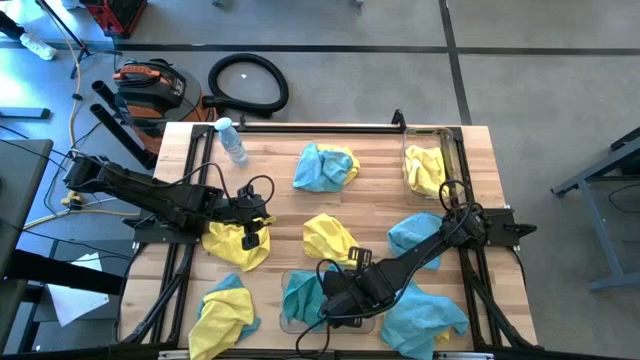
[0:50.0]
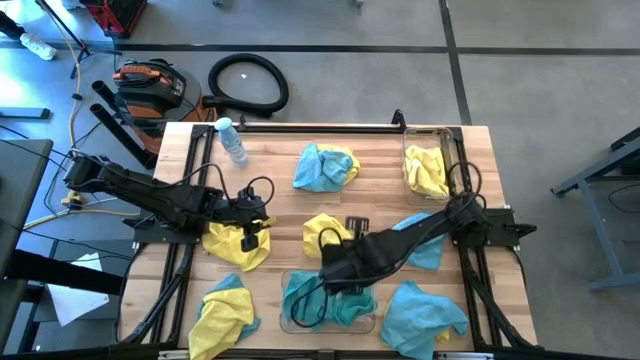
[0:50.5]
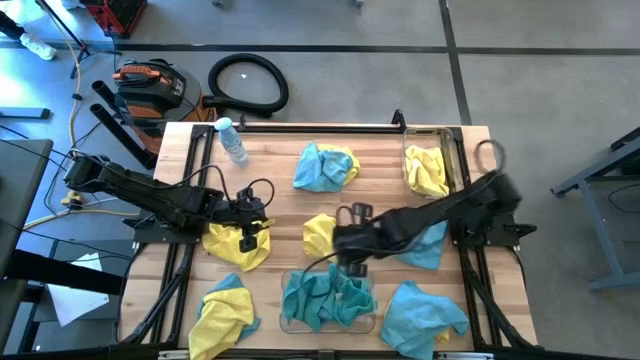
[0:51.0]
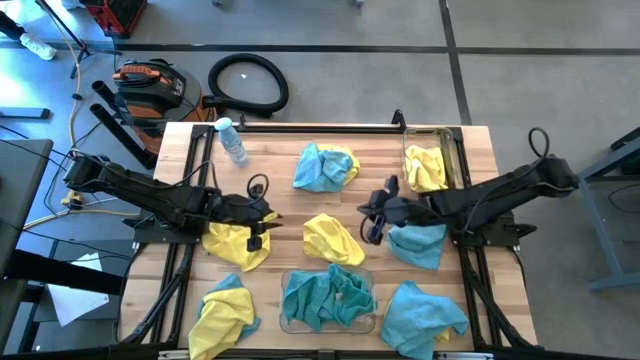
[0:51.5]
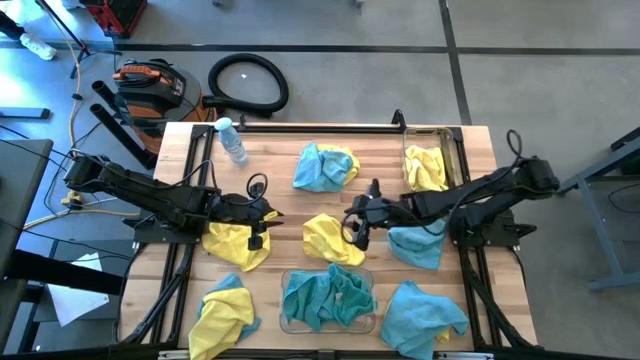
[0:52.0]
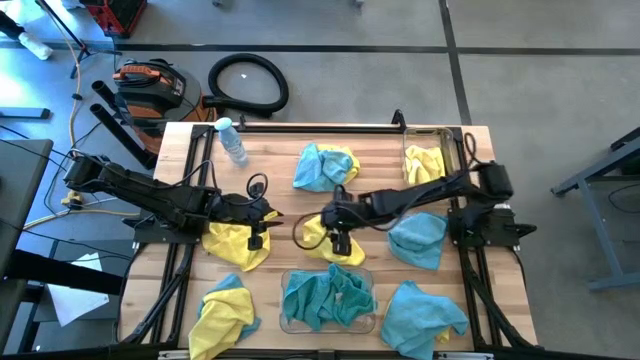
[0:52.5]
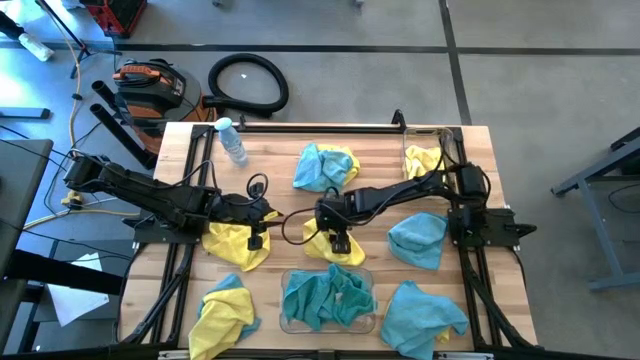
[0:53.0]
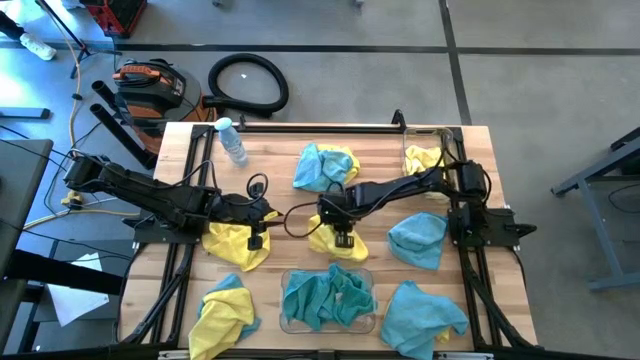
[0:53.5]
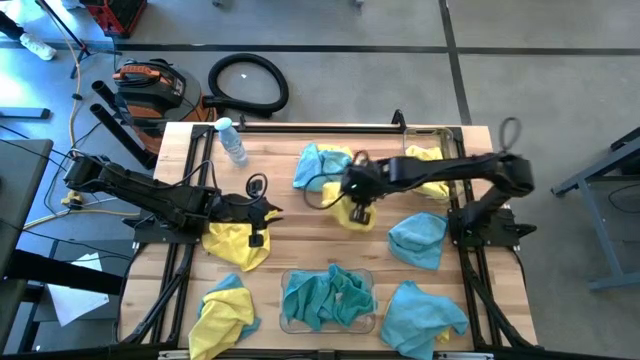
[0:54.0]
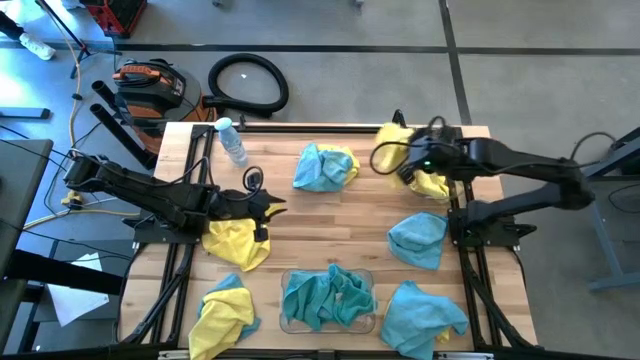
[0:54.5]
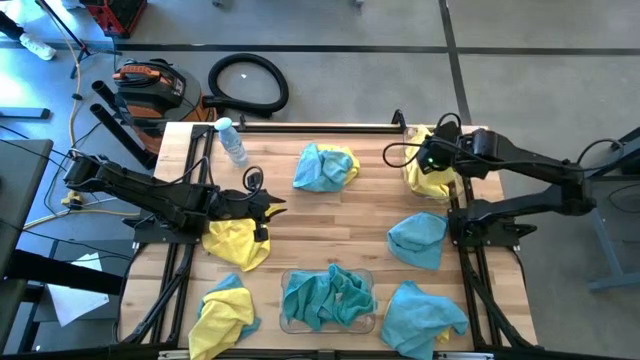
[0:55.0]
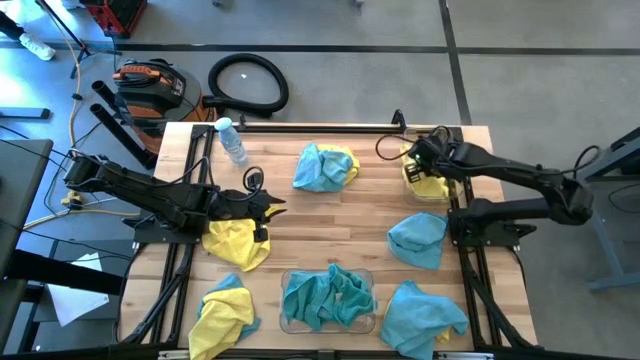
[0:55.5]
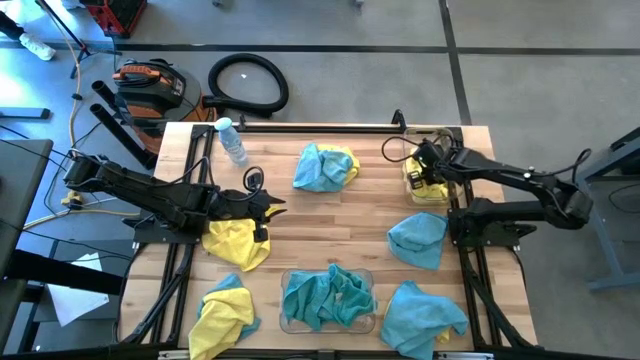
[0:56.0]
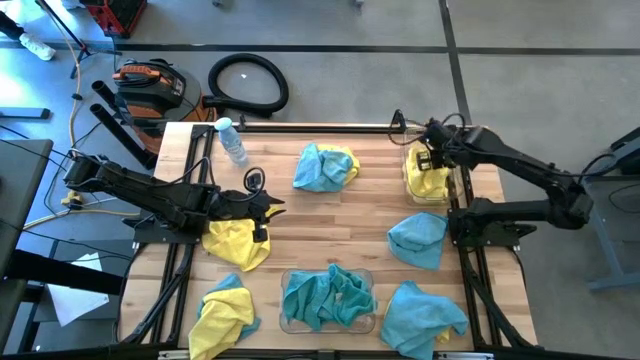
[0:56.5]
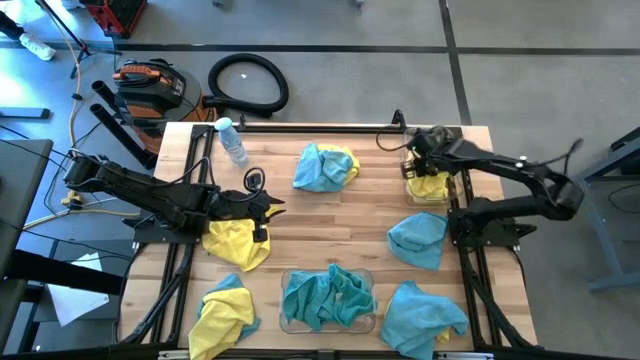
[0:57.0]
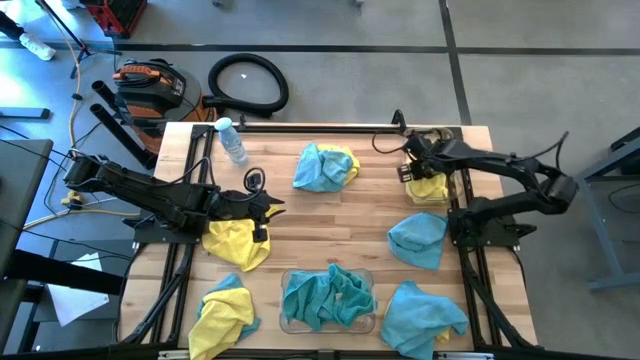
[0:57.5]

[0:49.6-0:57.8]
Task: Sort microfiber towel by color & place in baskets
Put the yellow microfiber towel into the top transparent bin

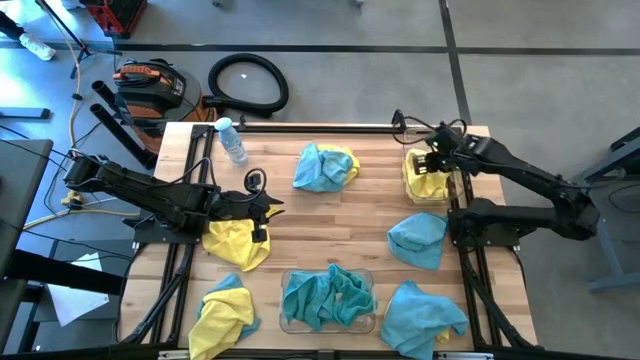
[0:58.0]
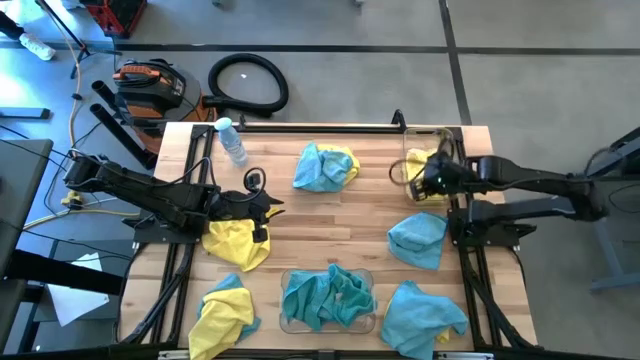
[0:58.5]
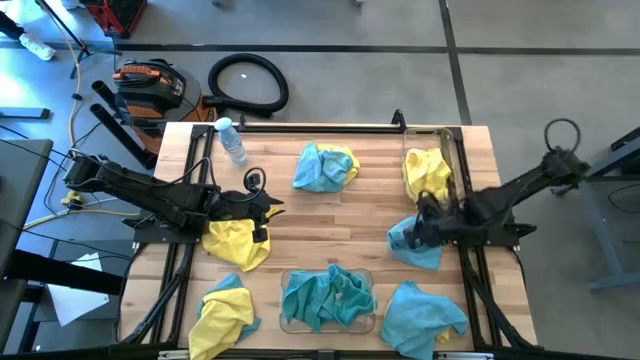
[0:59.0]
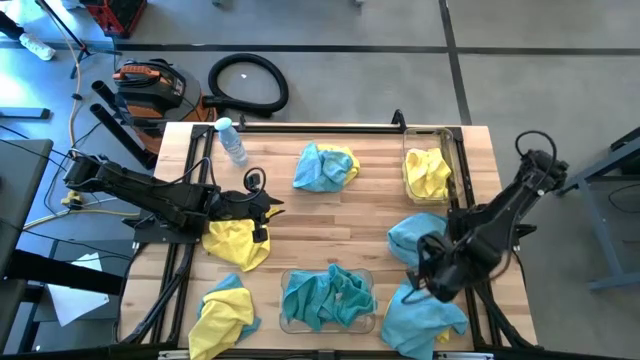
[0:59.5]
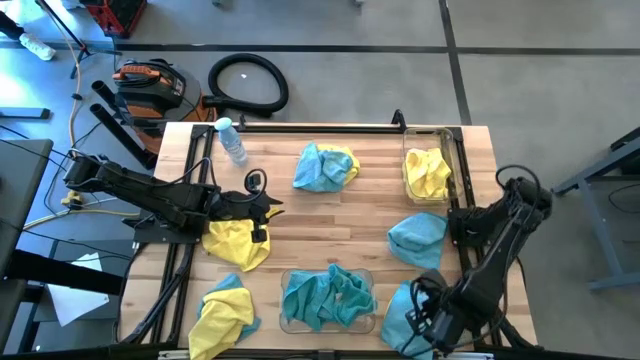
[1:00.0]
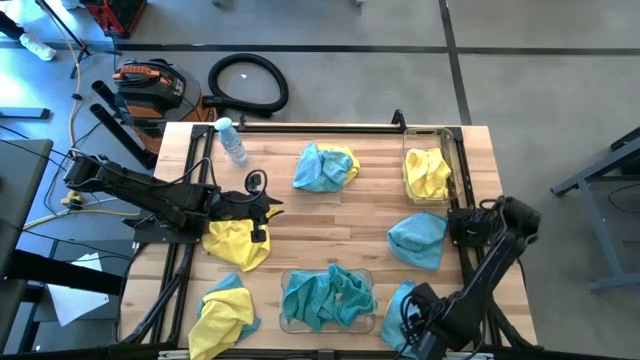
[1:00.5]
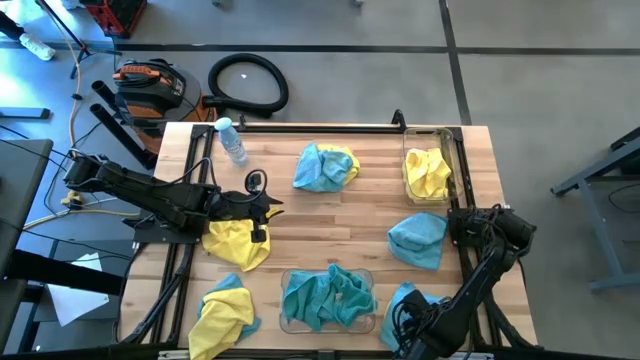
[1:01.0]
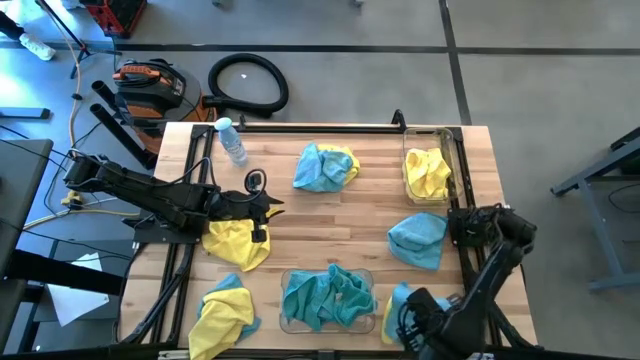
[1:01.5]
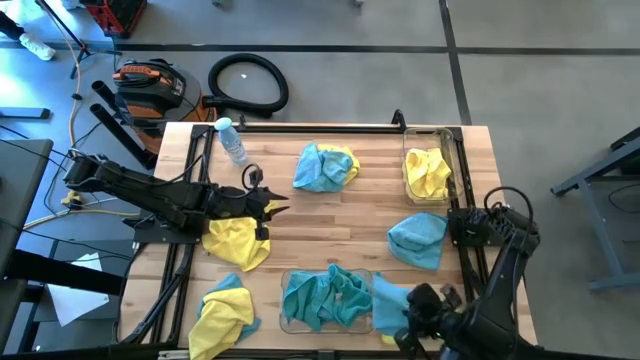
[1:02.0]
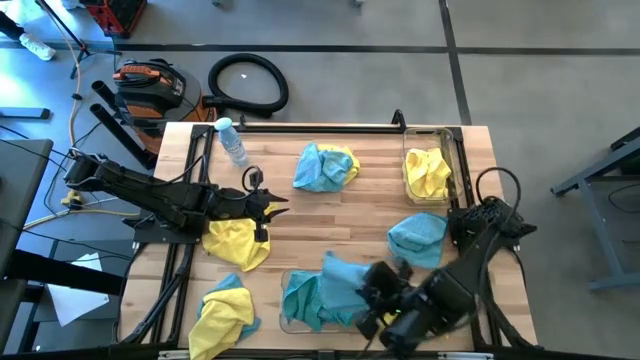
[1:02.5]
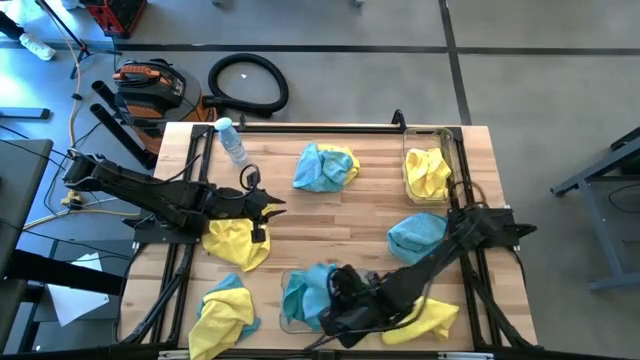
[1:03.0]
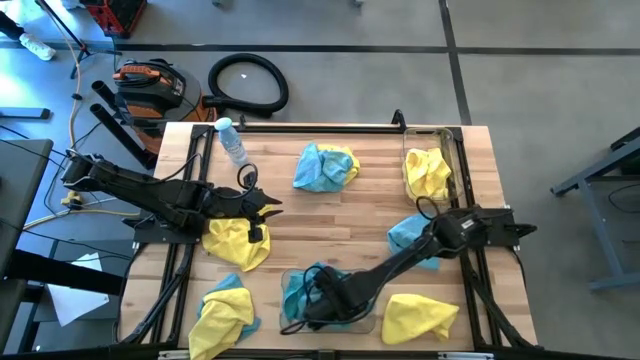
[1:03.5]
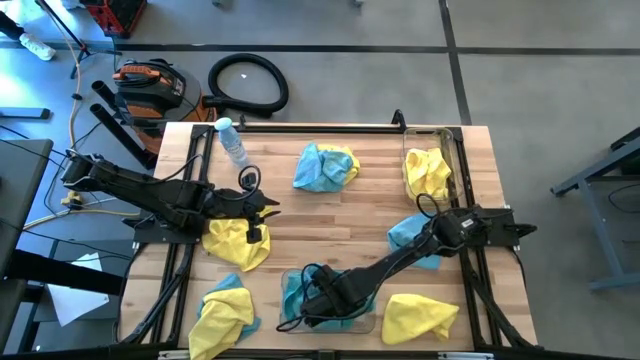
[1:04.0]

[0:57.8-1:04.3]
Put the blue microfiber towel into the bottom transparent bin

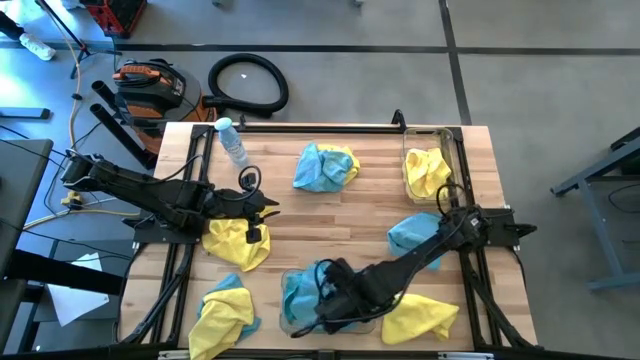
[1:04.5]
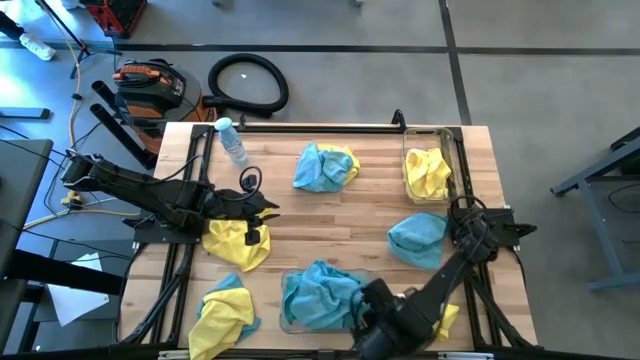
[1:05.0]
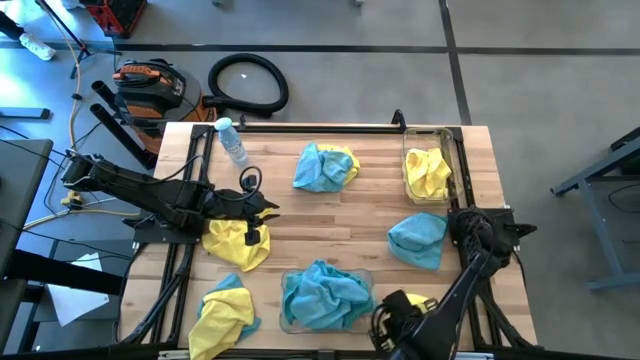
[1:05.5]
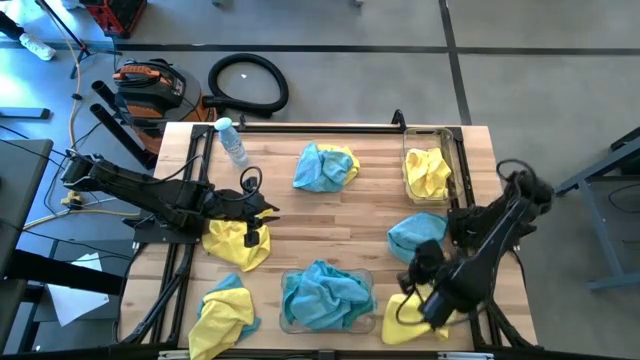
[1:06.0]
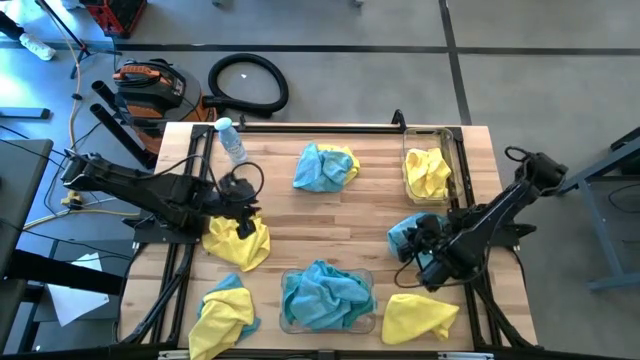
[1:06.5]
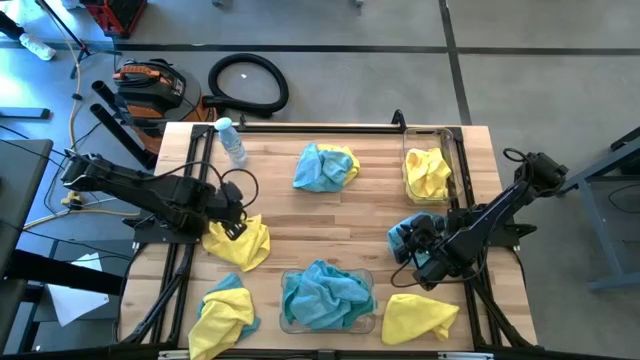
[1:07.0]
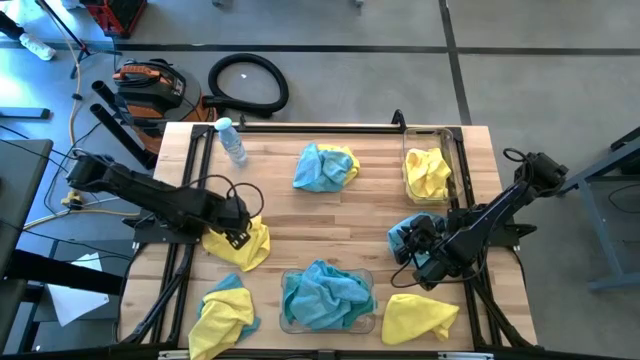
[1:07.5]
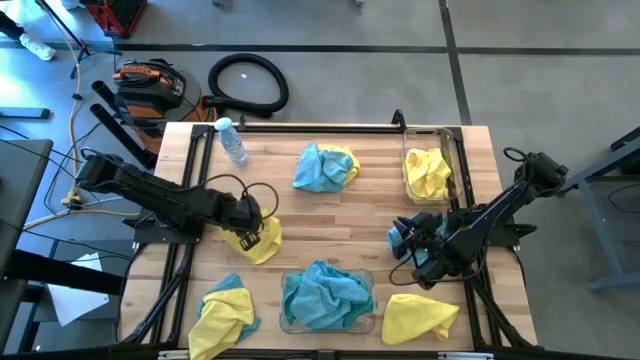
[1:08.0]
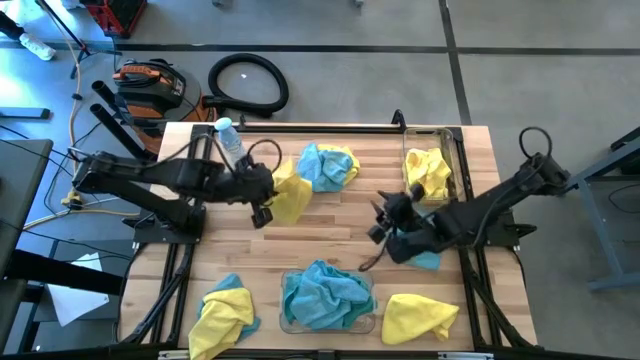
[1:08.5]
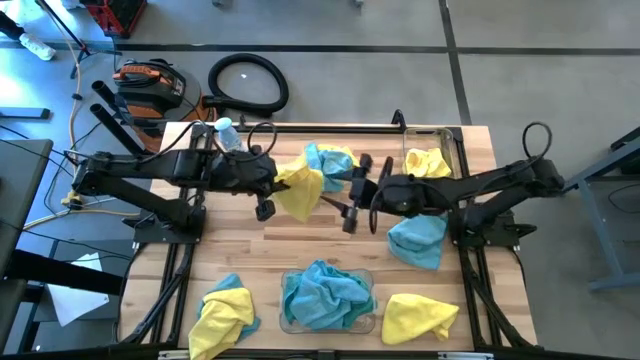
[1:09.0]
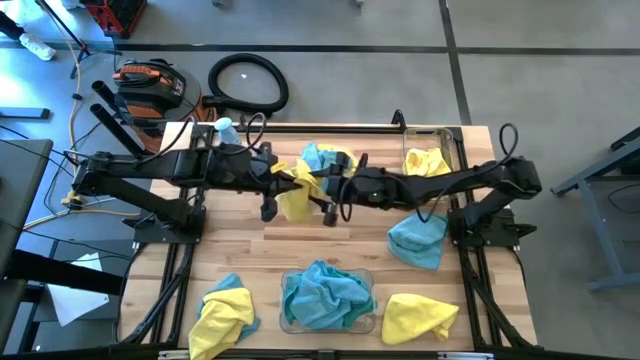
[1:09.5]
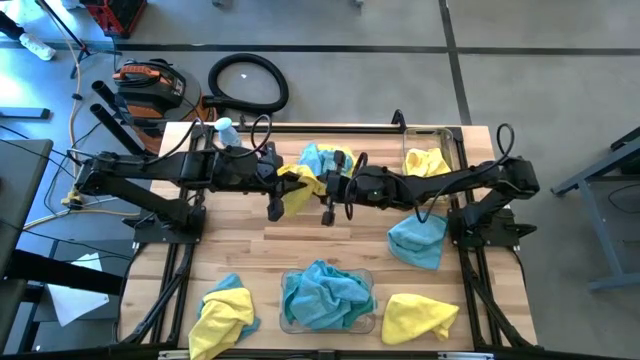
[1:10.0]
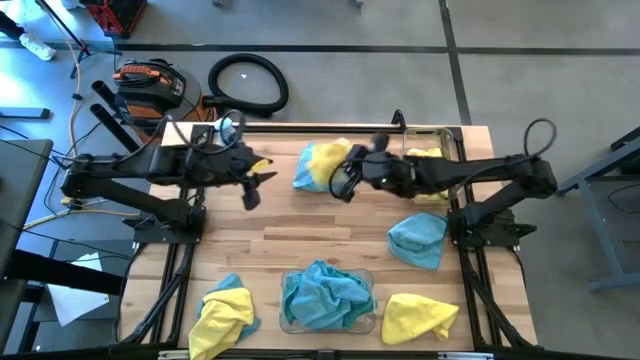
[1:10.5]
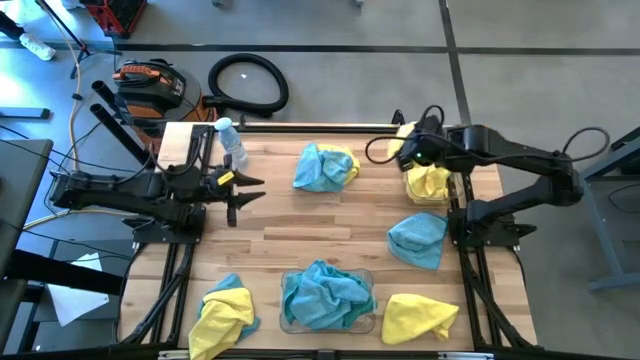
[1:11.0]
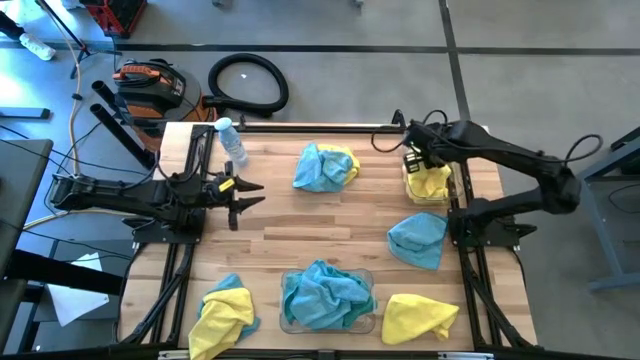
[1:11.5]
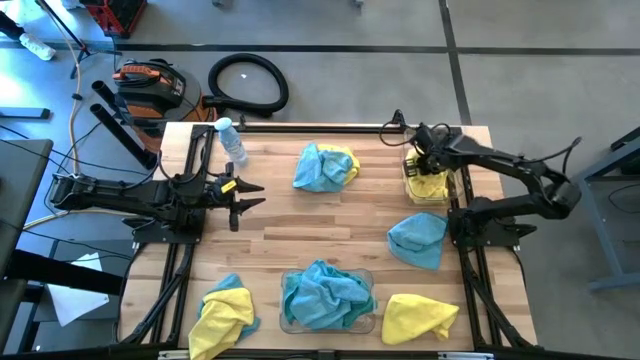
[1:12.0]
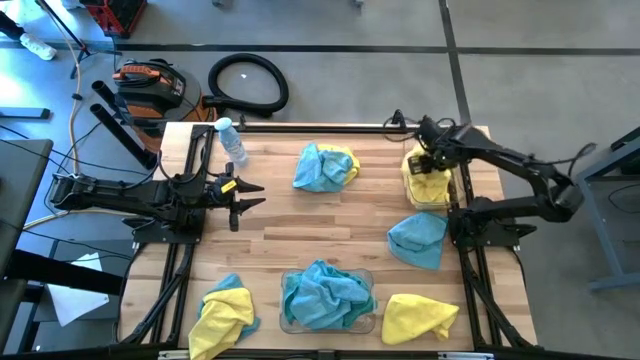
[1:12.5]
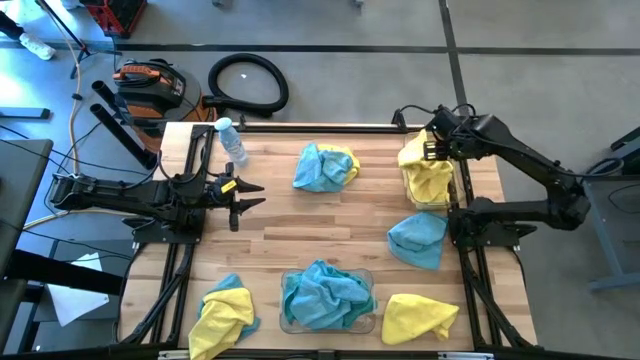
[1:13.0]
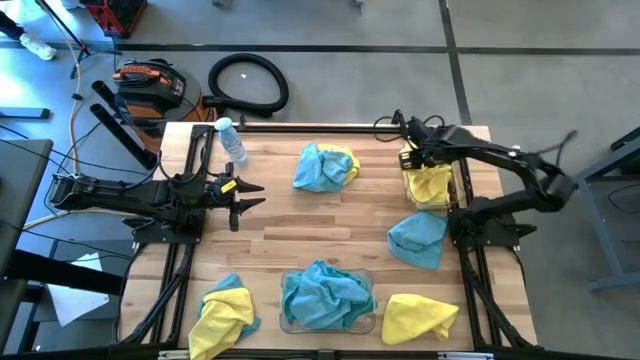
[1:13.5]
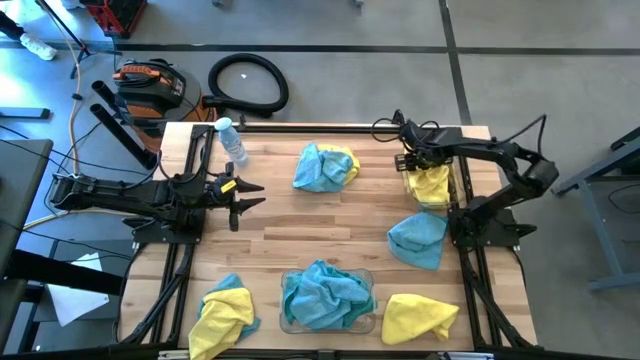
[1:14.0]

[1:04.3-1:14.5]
Put the yellow microfiber towel into the top transparent bin
